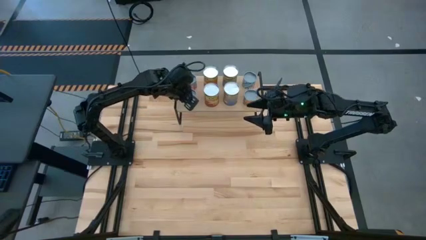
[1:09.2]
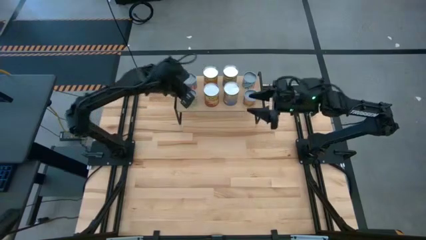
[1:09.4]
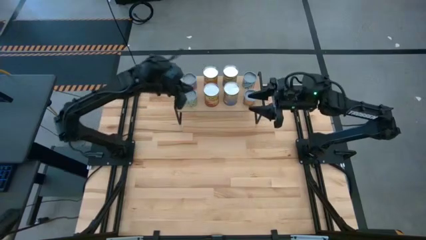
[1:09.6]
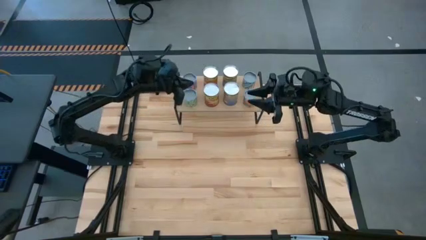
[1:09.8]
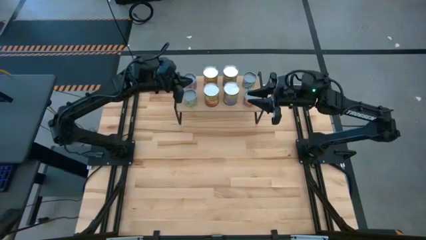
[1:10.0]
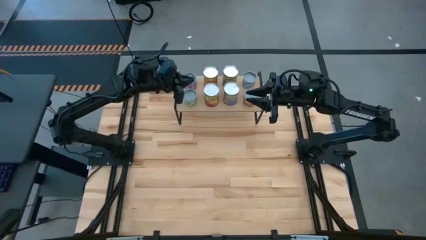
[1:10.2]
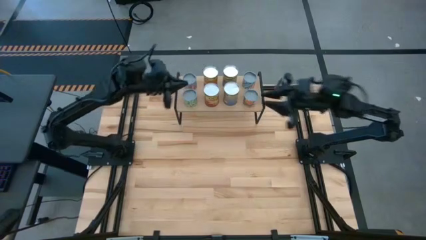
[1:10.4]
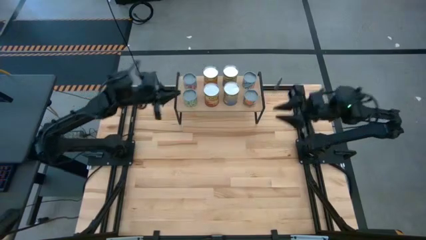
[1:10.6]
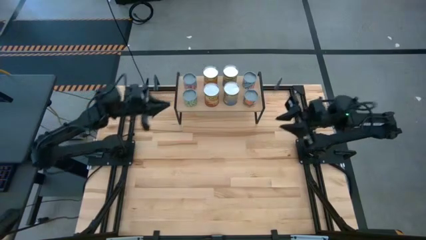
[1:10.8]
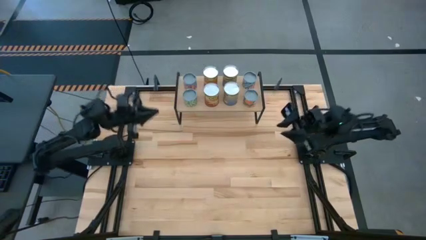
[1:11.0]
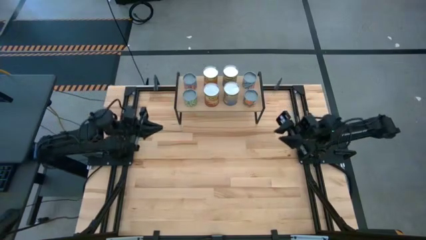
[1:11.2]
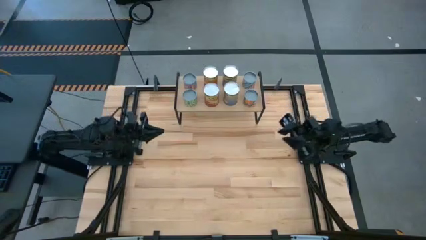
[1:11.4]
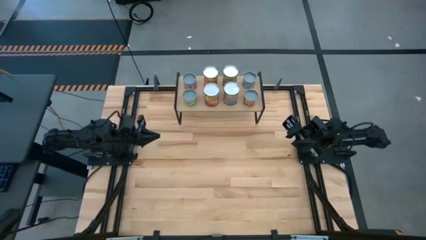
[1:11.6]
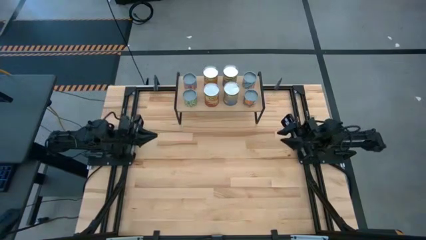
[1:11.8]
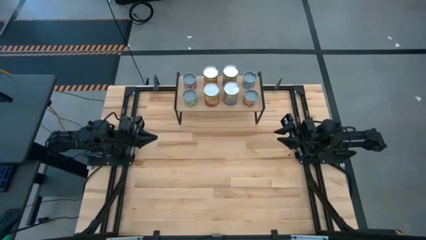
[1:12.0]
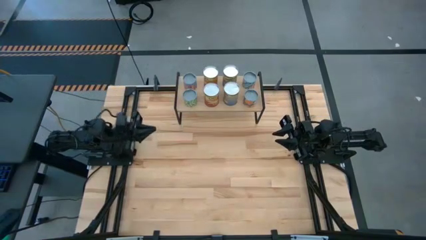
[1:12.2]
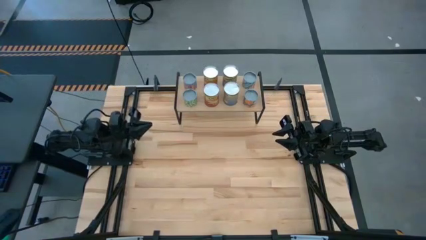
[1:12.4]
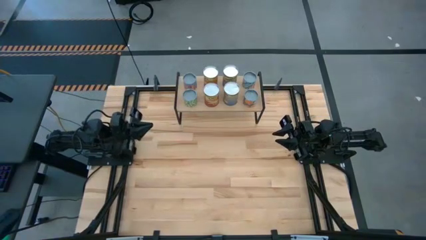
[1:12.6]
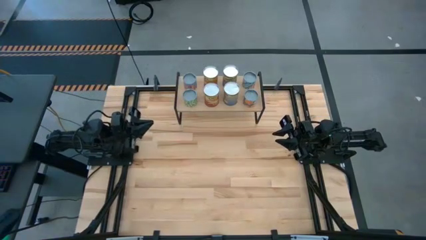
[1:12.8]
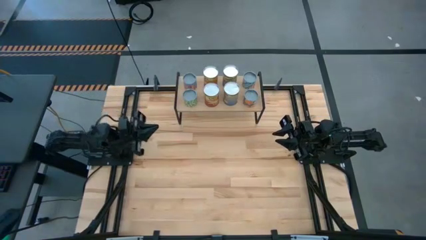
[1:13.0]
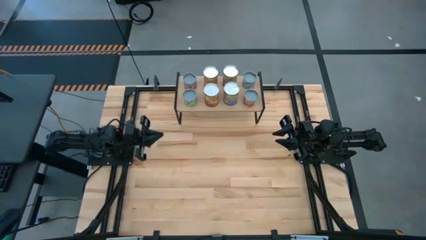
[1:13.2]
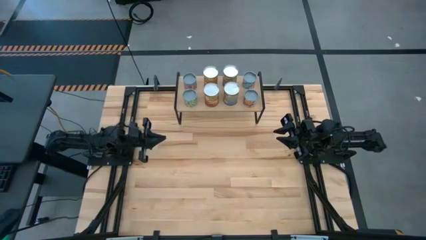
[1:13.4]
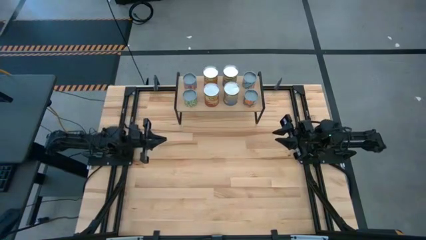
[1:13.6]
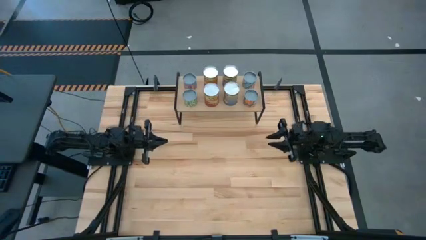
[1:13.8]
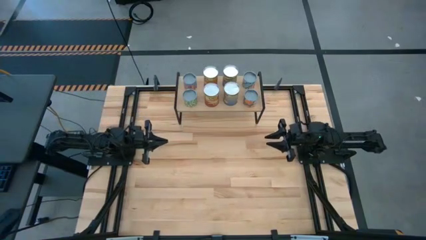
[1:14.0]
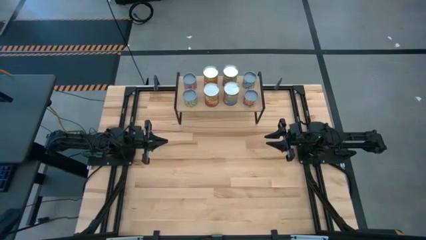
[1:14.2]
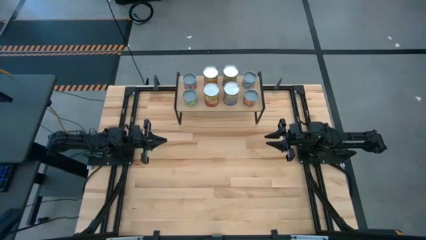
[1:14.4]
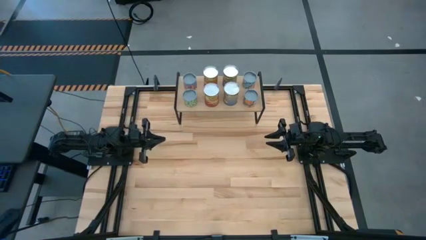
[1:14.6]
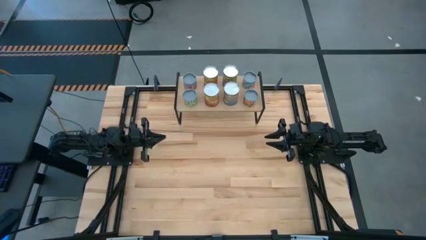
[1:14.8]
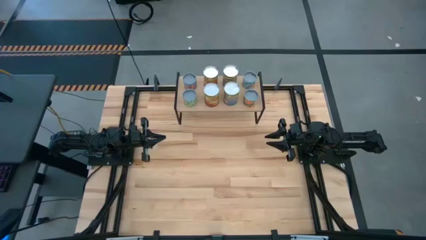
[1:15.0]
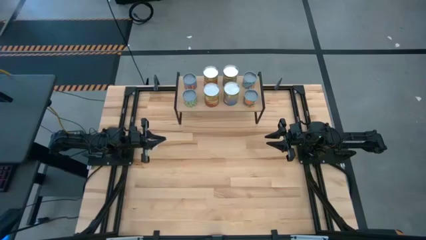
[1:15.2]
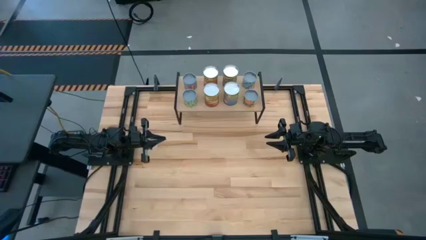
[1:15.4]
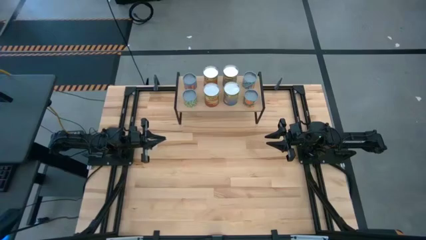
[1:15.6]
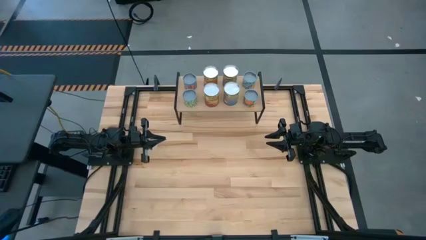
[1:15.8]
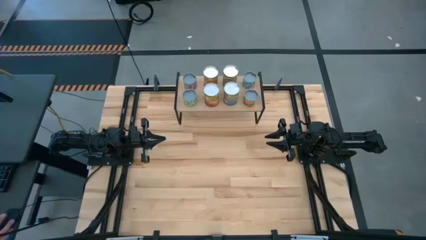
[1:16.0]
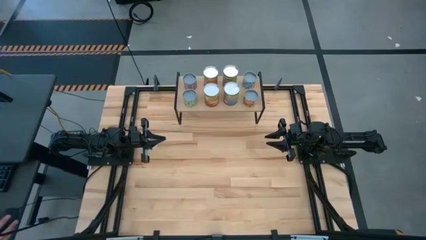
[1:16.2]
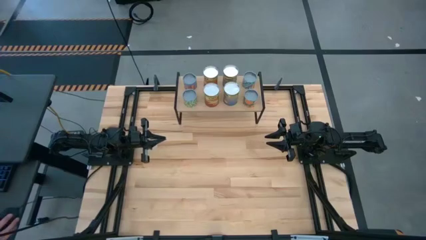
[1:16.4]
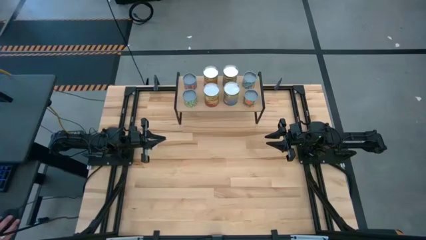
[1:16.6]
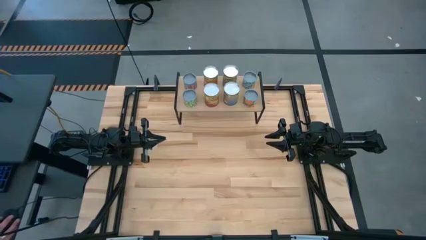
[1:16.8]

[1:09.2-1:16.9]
Task: Pick and place cans onto a shelf
Return to Home Position

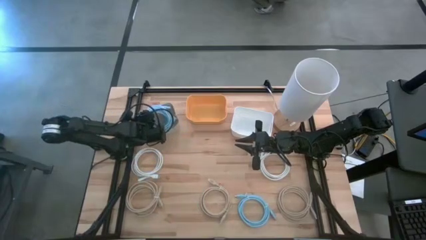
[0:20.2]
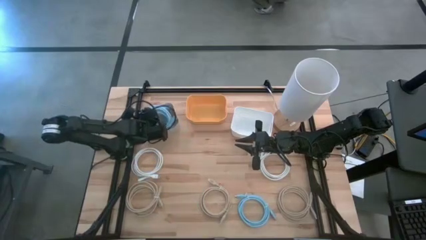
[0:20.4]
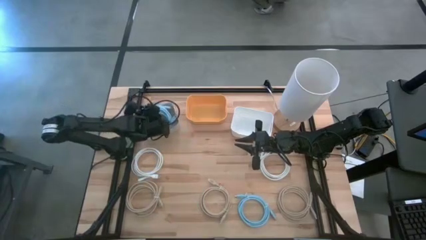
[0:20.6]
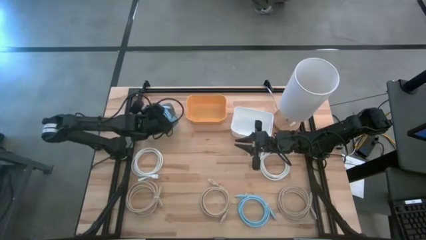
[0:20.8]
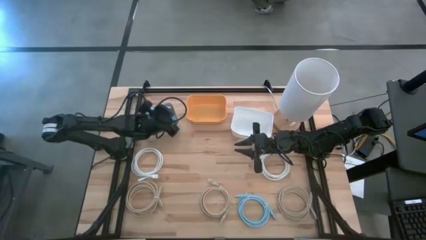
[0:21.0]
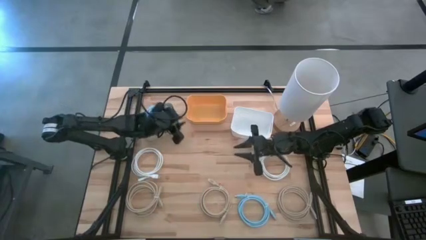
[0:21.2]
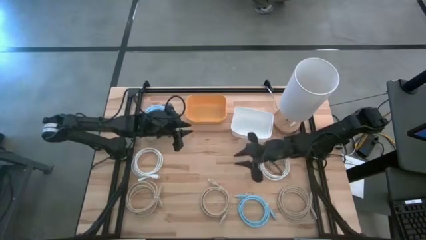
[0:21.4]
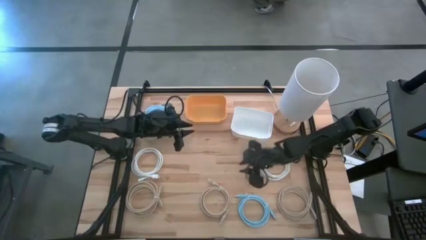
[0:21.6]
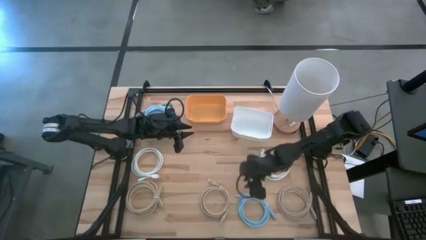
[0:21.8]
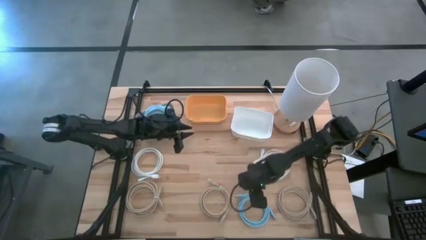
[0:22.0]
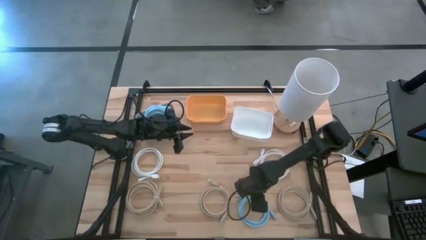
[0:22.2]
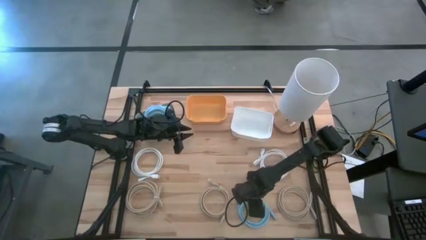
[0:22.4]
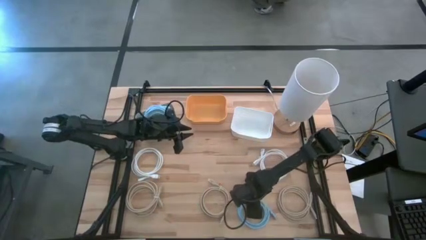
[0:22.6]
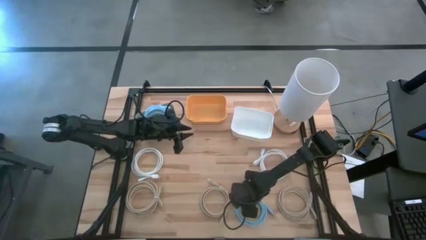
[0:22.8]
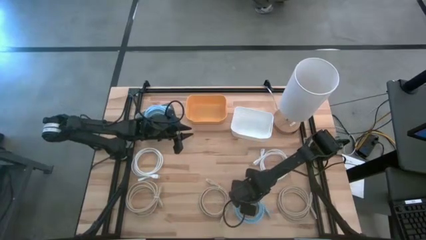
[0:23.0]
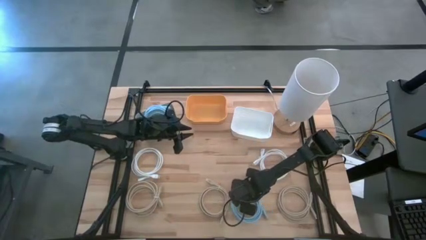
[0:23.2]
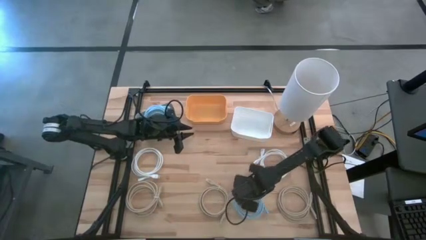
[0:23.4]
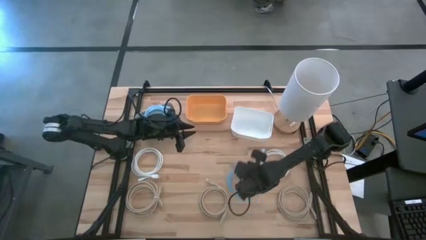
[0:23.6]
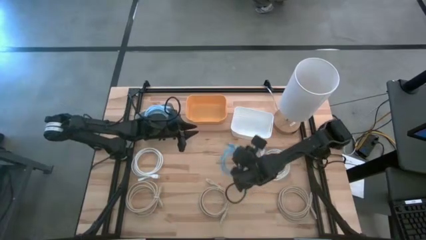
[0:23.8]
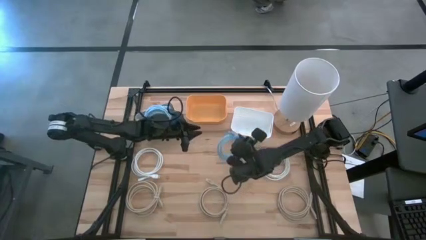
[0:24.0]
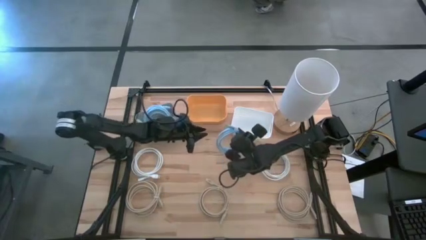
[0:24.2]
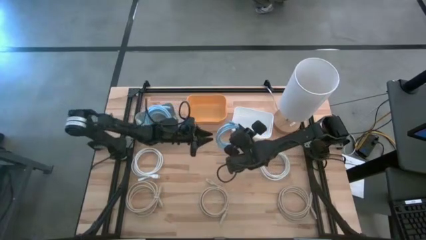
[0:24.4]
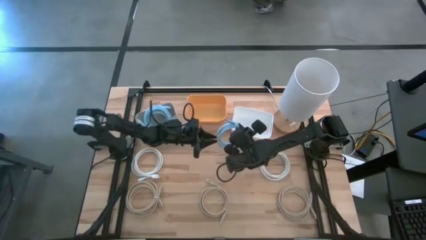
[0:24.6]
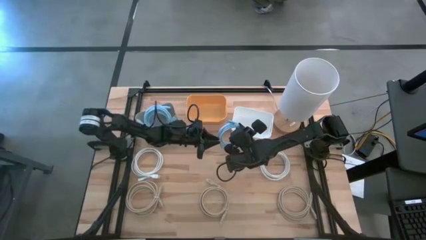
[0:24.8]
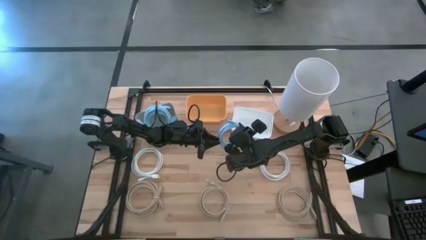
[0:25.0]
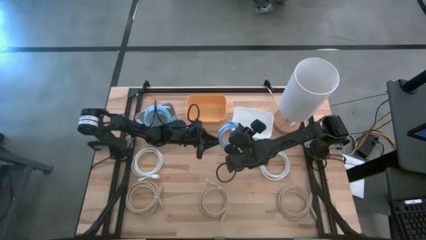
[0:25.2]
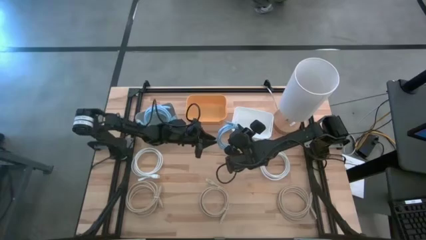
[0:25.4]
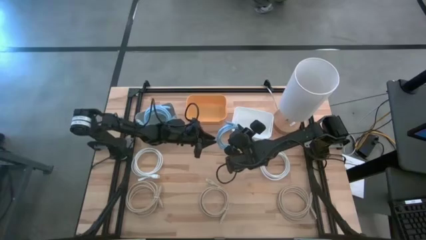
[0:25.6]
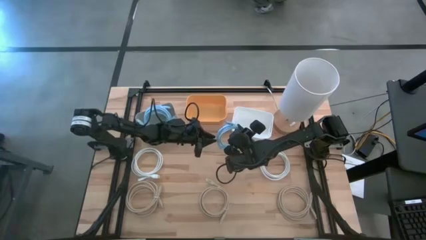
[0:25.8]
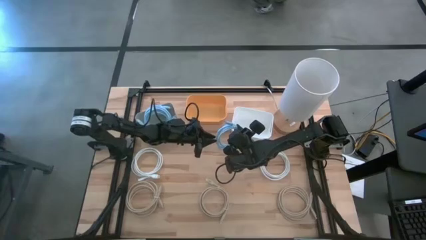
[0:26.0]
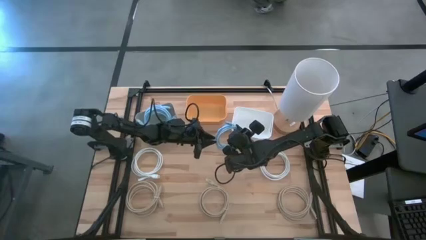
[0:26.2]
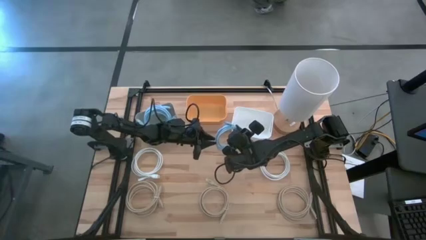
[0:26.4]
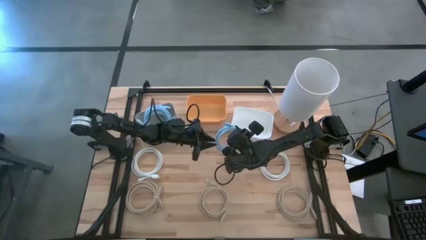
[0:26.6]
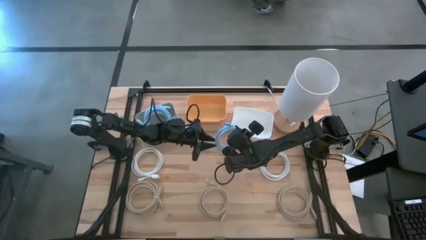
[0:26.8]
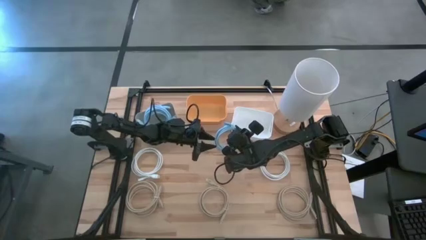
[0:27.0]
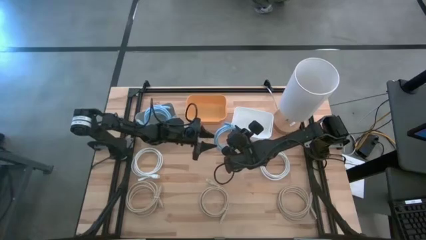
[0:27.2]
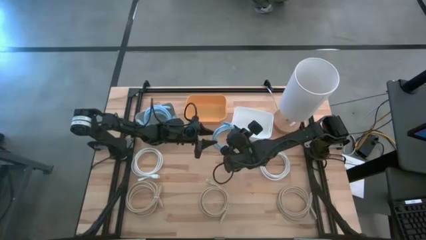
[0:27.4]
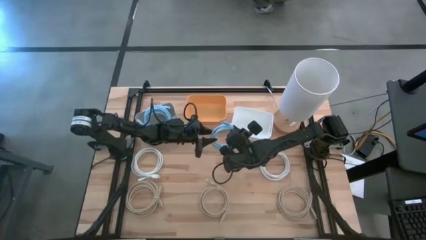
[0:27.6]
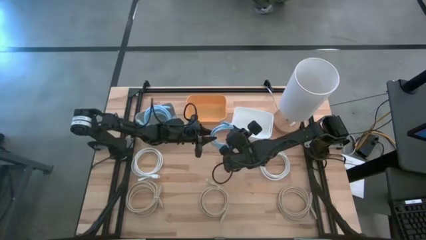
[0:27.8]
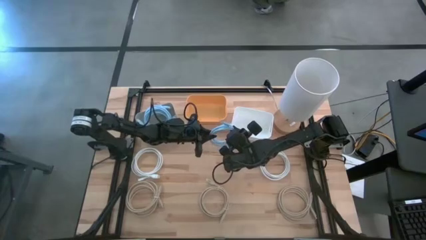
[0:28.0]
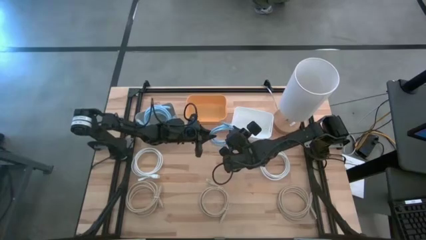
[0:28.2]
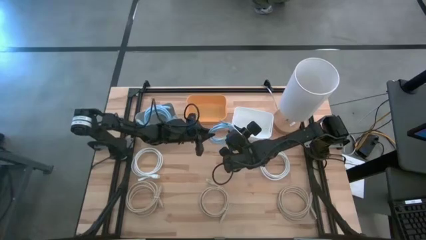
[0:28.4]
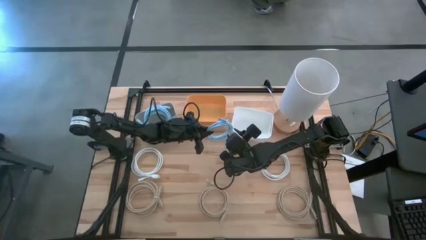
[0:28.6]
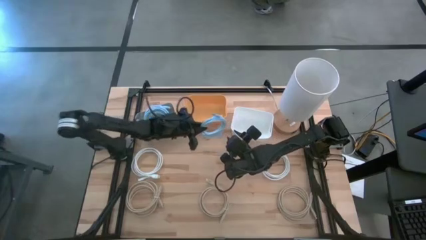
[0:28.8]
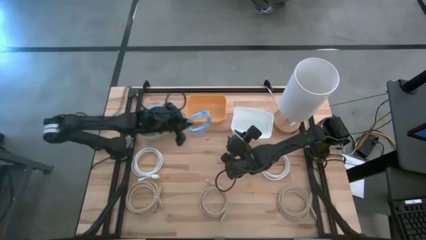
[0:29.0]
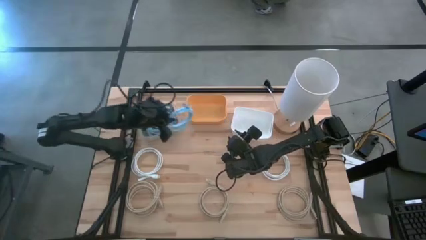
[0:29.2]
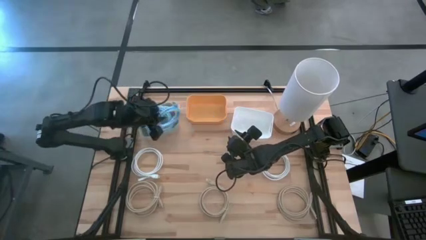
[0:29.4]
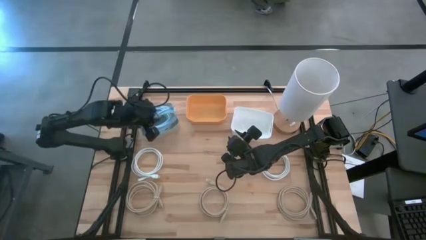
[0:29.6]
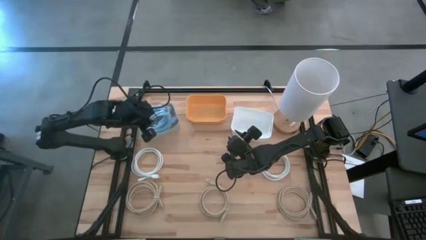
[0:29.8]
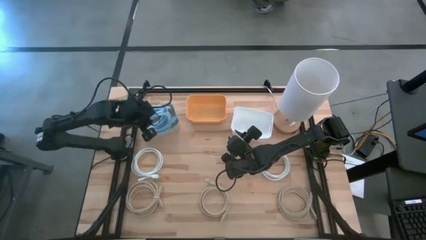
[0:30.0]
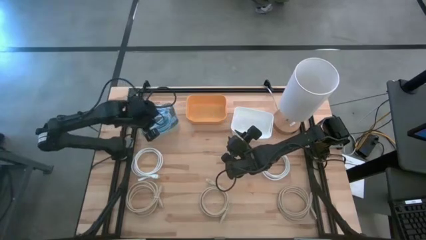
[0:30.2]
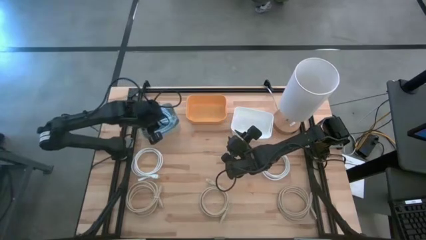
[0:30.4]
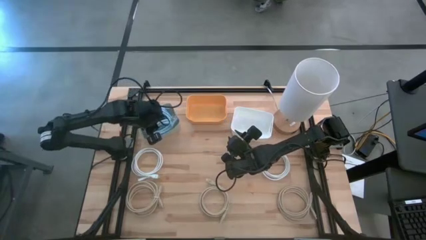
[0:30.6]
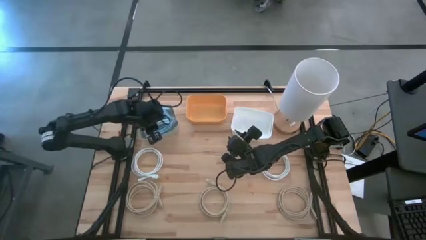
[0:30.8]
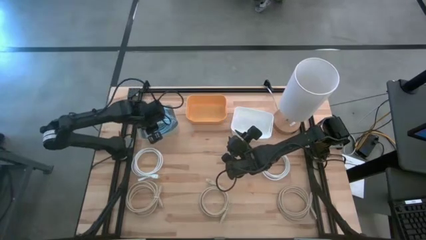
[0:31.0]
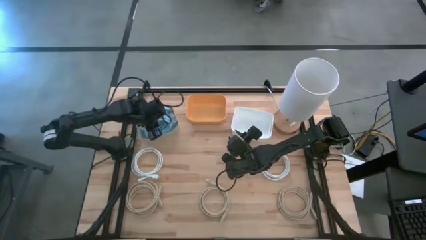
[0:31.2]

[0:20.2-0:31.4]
Task: Sort HDMI cables
Put the blue hdmi cable into the gray bin
